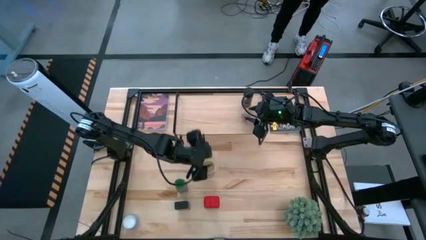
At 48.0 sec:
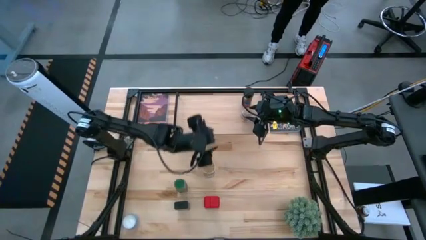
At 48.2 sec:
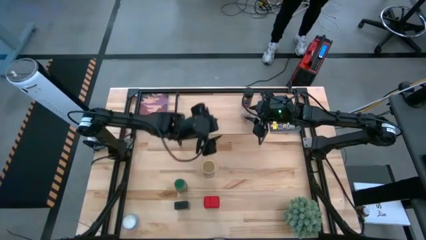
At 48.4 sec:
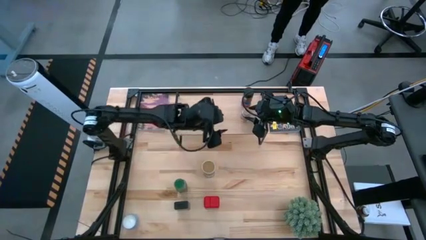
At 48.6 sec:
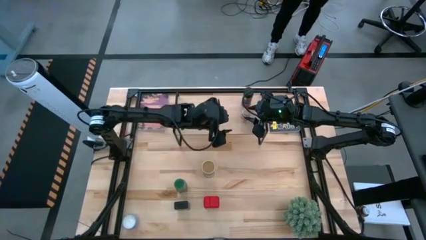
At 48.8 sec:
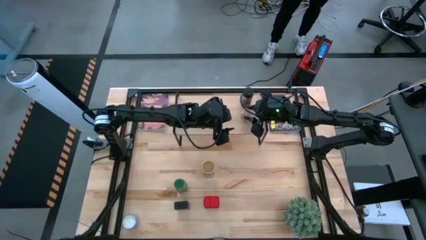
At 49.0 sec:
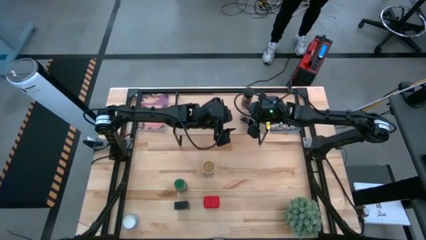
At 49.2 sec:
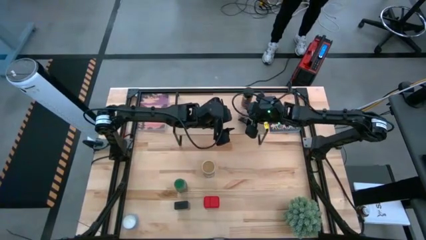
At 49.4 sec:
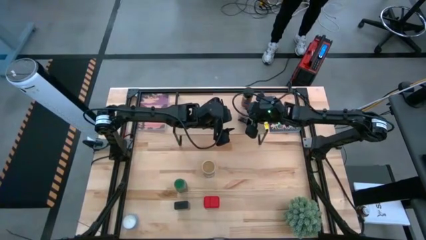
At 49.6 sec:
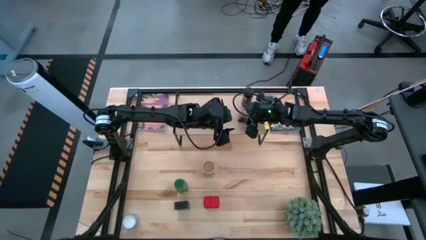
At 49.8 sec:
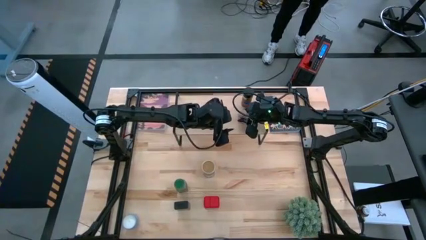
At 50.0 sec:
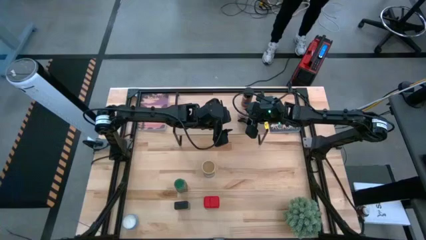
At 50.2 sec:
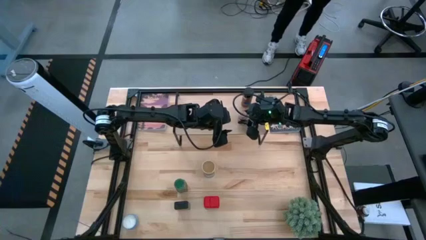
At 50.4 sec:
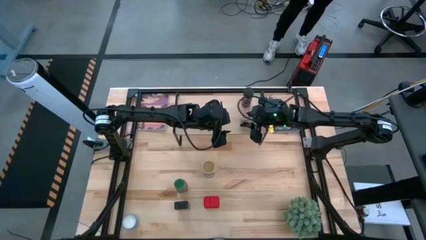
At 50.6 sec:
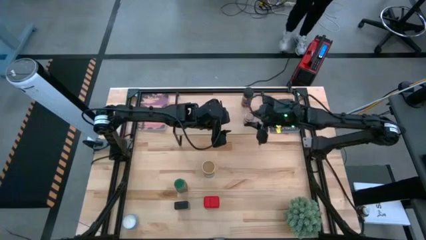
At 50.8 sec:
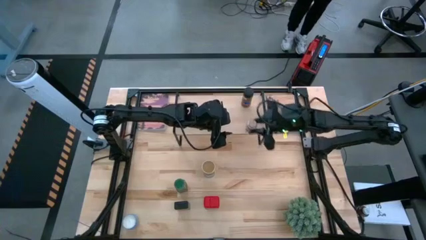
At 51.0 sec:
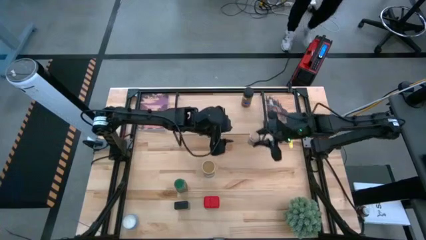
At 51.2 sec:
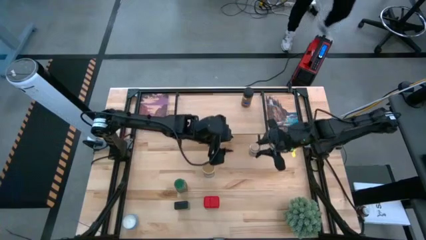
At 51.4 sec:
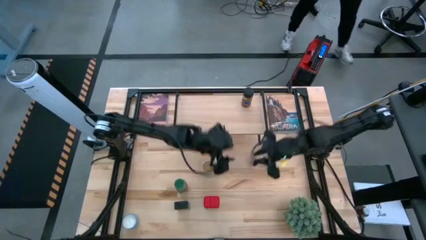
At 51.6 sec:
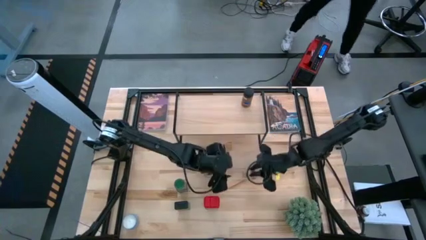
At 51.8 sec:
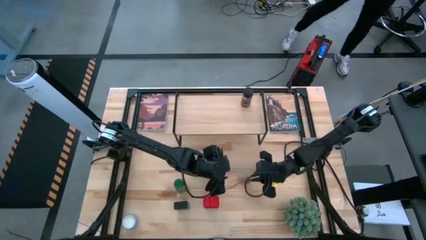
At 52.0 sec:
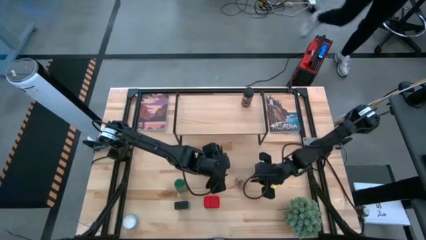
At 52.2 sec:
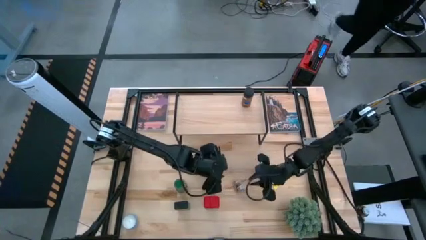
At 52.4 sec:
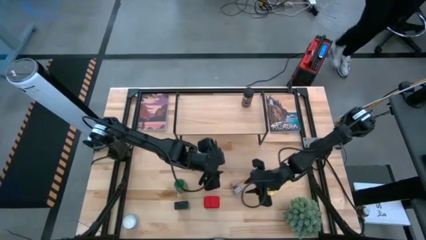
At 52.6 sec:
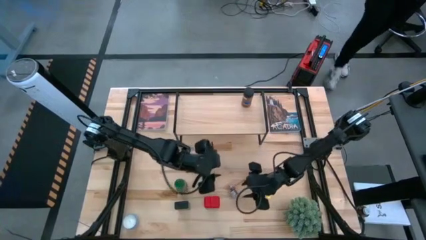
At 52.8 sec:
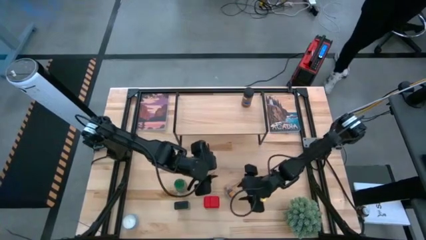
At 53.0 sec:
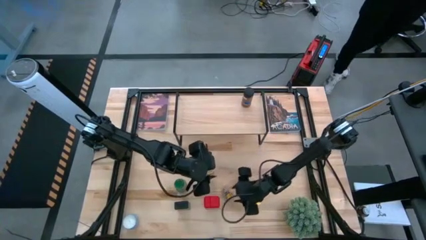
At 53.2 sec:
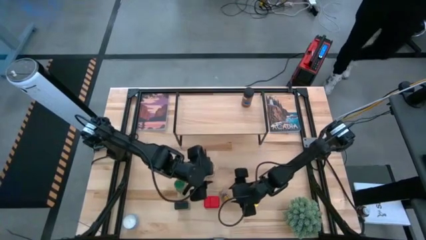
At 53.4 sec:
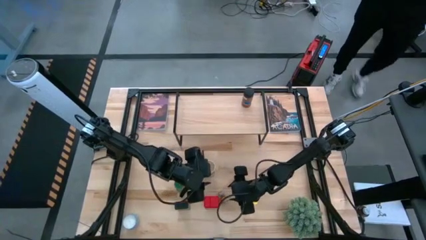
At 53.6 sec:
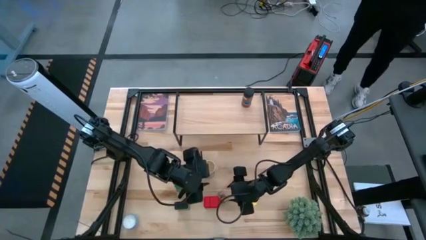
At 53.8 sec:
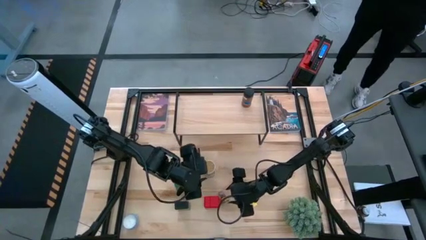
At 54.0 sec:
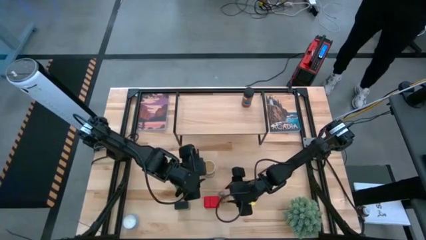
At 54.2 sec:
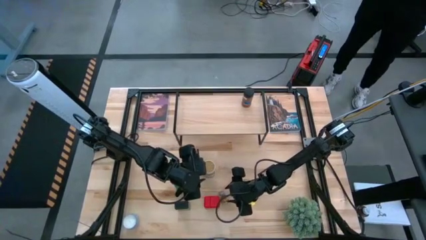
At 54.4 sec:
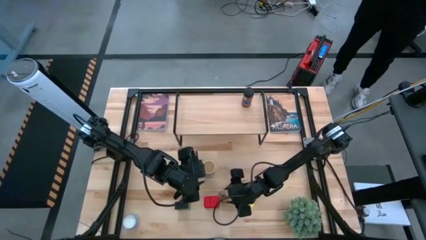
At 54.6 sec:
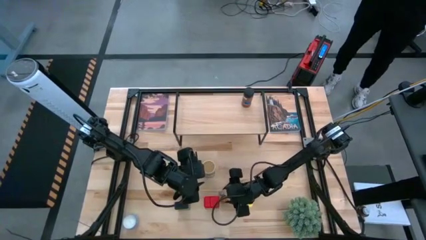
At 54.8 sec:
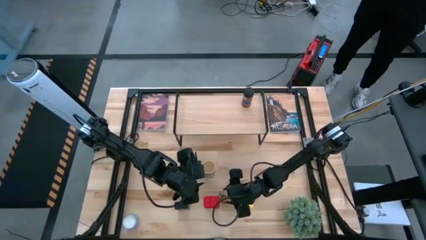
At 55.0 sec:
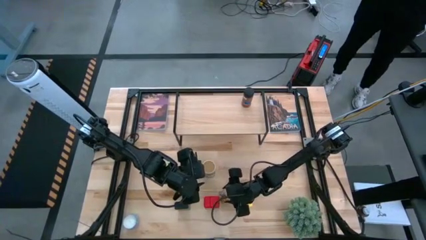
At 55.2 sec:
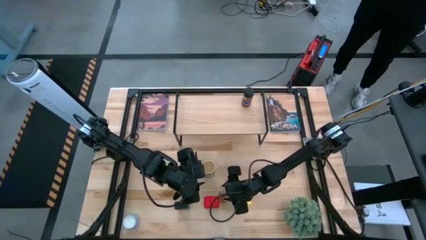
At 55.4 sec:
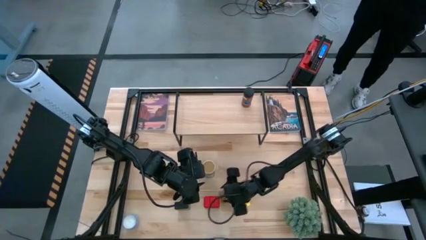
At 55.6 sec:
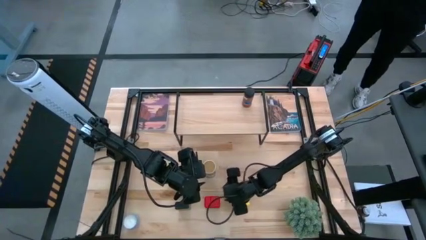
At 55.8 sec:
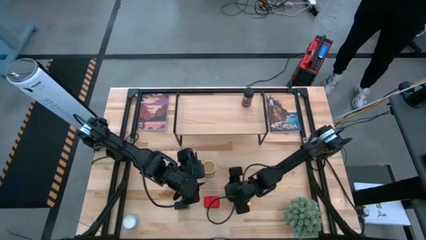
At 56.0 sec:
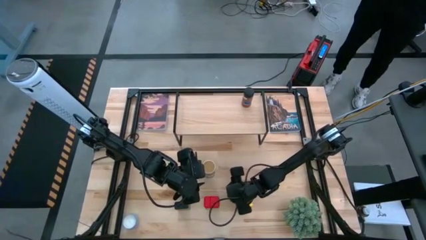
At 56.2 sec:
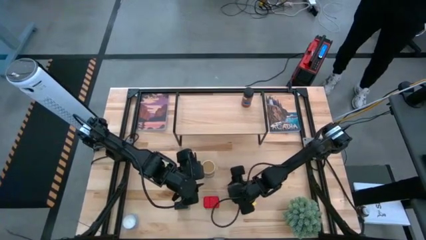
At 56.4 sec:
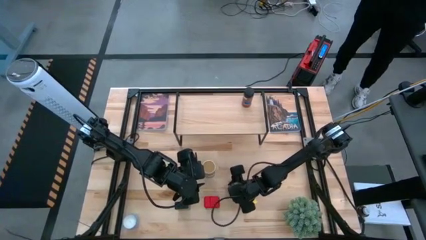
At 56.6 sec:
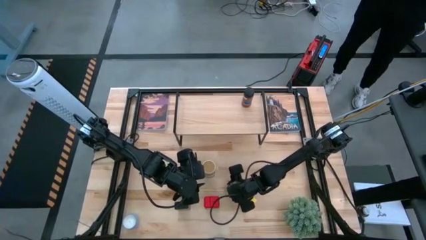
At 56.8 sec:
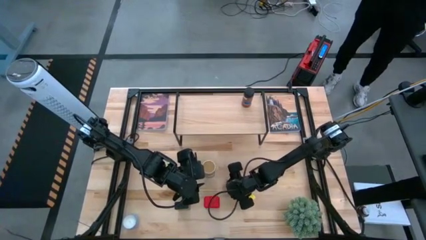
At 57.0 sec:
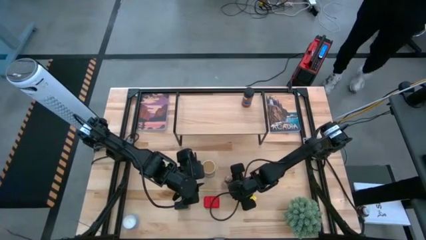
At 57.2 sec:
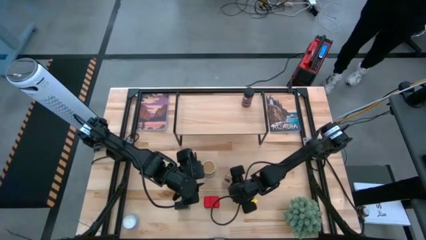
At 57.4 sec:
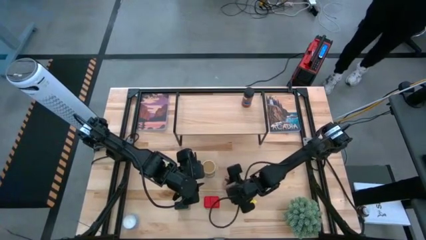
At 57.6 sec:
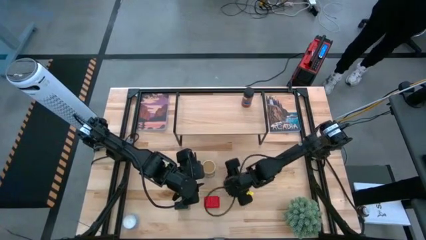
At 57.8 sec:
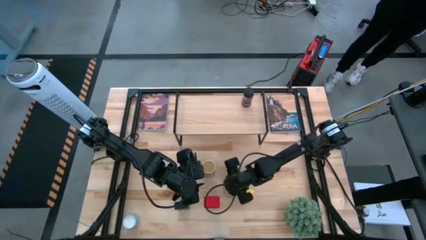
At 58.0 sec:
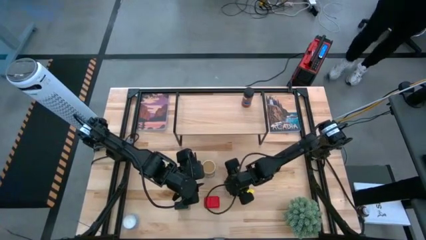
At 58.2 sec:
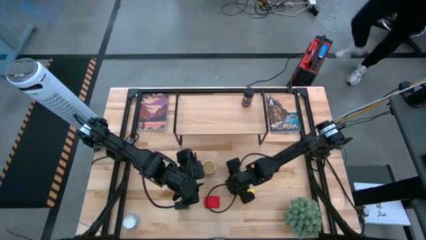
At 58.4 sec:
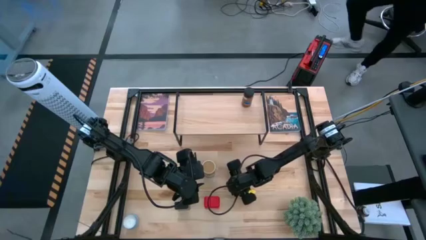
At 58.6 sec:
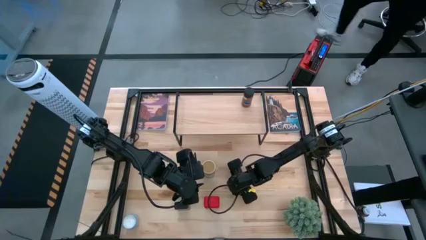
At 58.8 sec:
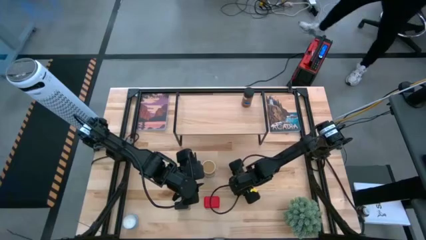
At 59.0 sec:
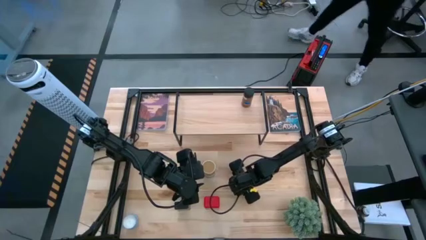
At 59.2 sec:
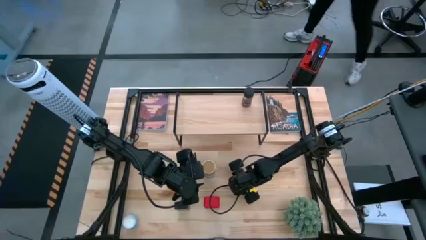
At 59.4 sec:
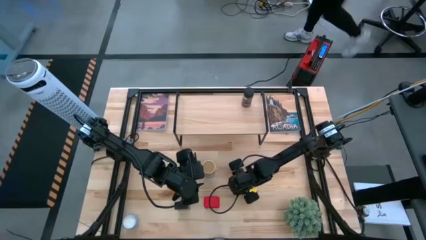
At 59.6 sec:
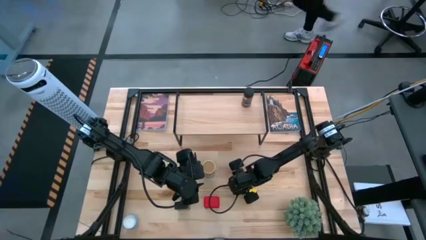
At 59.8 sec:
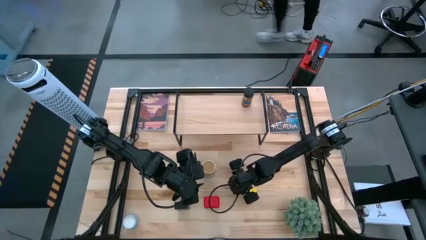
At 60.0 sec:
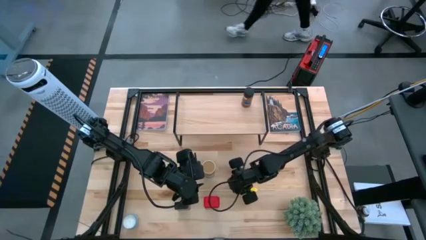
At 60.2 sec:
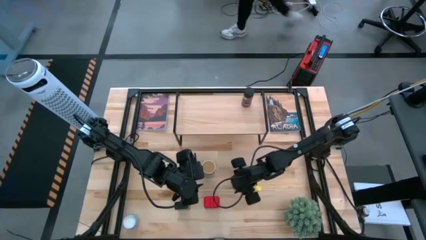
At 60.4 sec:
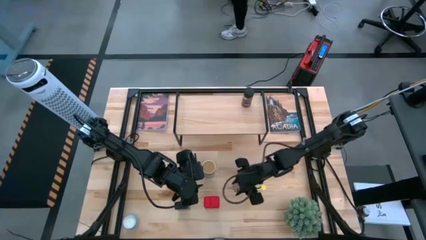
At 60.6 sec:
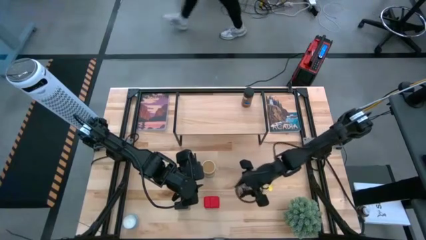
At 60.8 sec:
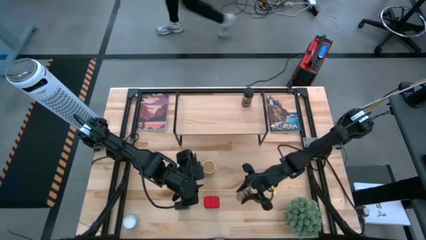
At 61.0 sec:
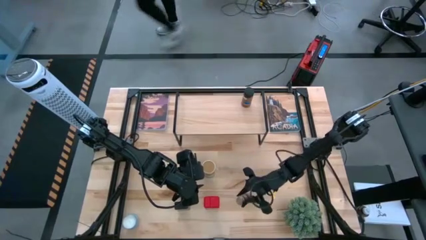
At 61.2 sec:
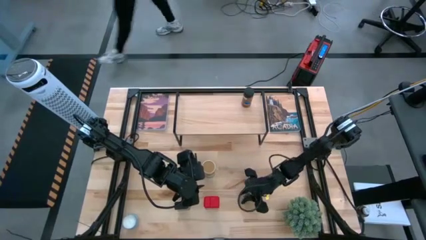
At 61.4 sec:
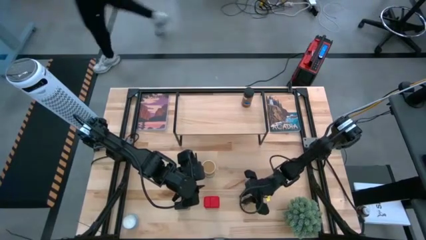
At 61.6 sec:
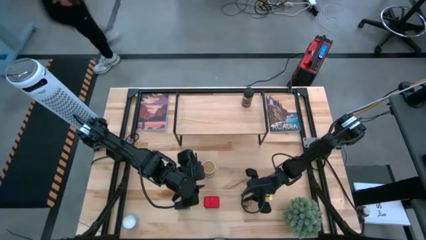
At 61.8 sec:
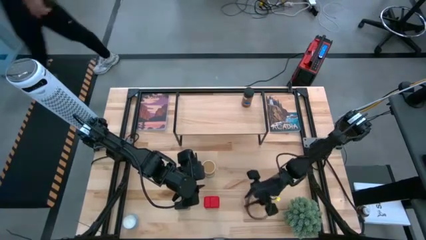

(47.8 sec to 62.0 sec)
Task: Shelf spices
Remove the brown seasoning bottle from the shelf
